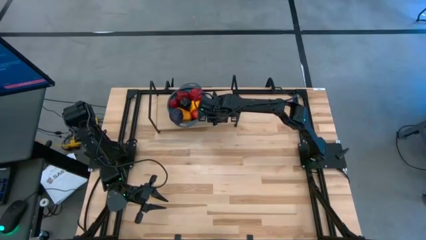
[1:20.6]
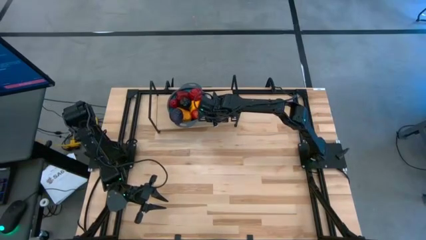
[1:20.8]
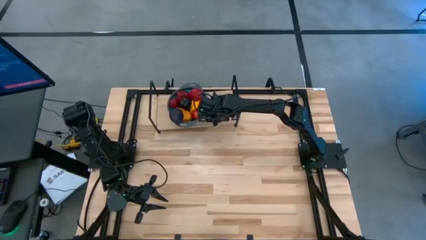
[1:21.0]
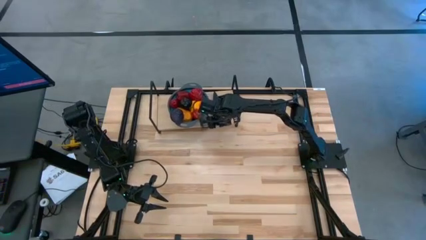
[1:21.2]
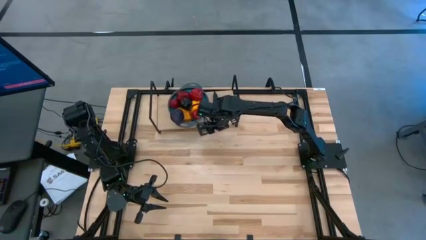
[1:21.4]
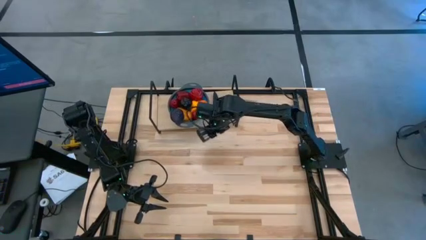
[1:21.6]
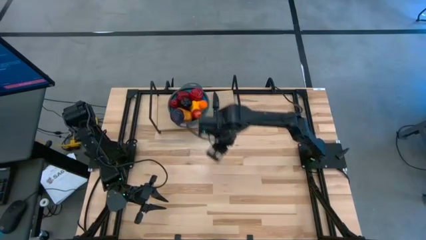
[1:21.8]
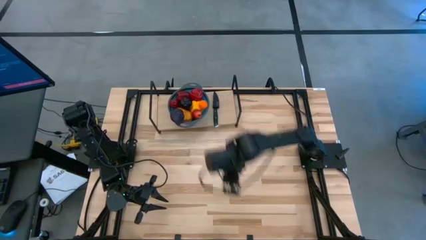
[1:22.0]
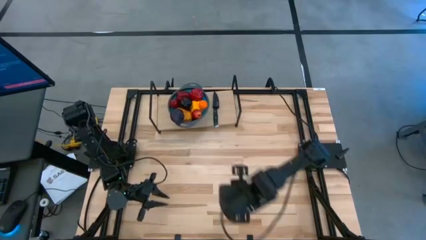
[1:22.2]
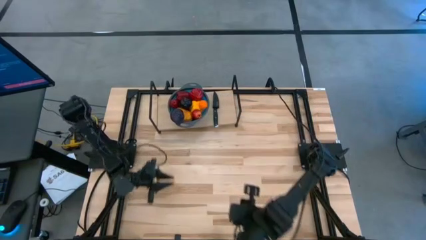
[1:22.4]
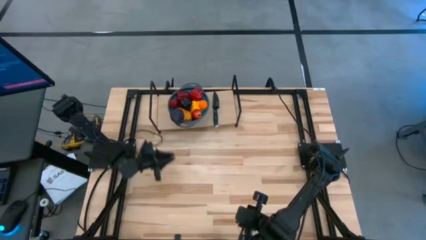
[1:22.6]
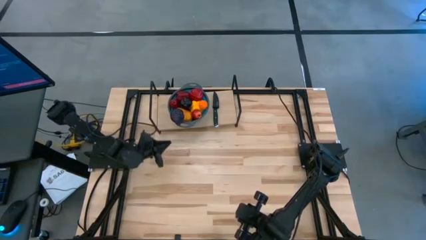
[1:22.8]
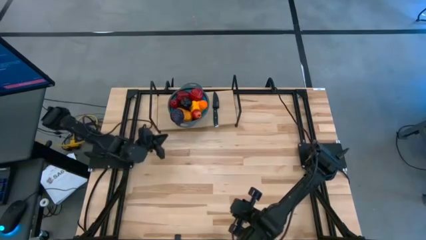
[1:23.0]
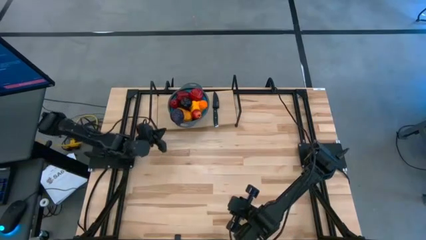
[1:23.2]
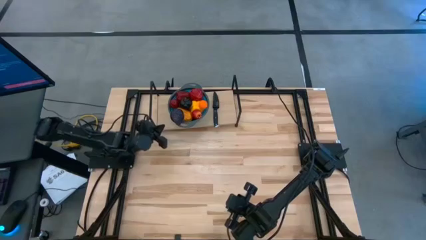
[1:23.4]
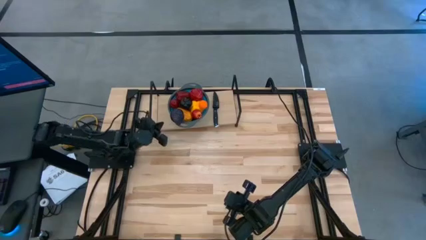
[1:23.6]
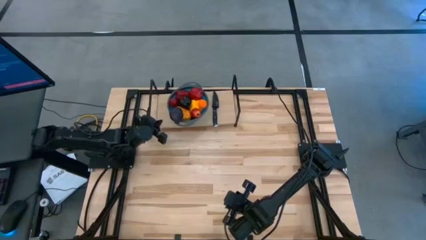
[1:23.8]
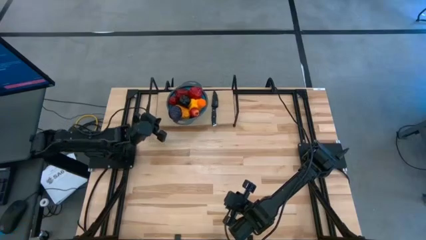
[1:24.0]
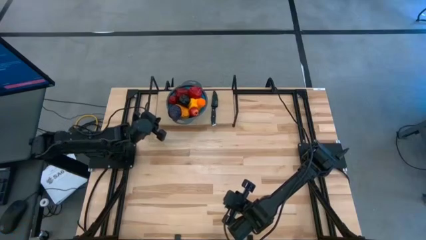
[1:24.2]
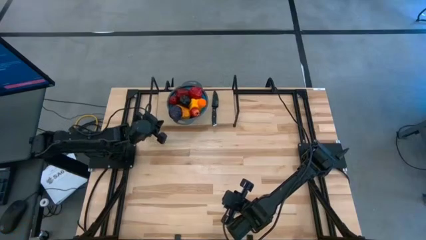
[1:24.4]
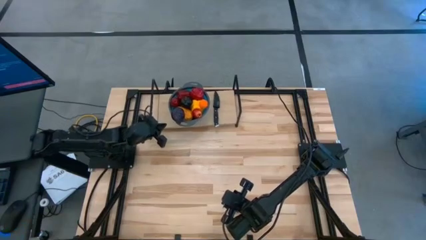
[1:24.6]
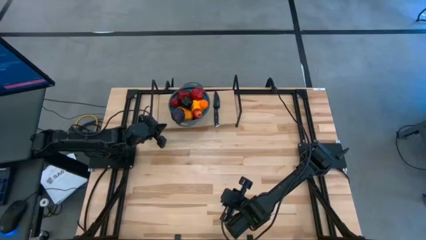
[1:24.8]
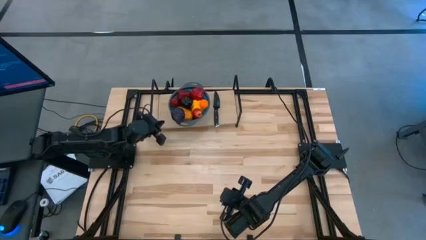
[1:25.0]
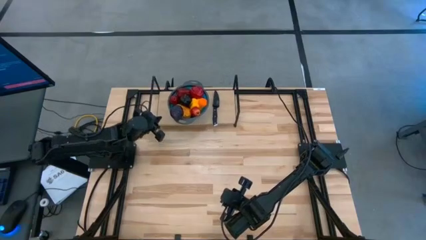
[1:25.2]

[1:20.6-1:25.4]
Task: Pick & Place Fruit
Adjust the shelf to align the position

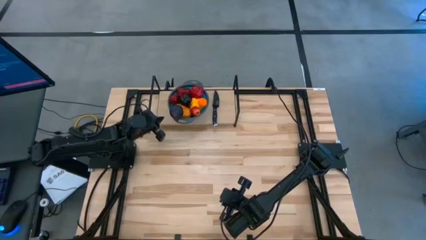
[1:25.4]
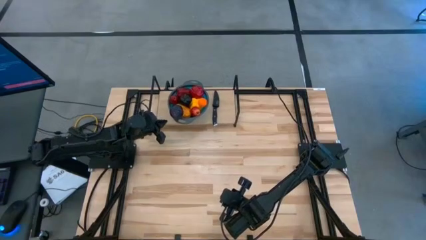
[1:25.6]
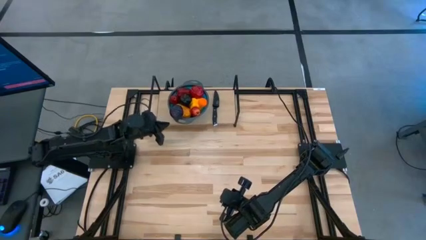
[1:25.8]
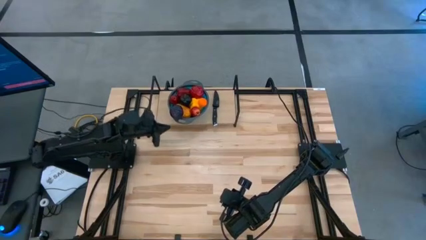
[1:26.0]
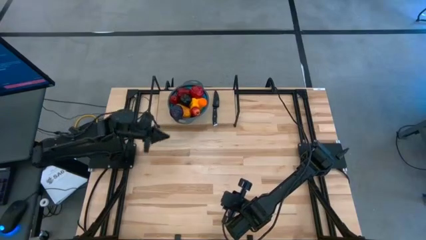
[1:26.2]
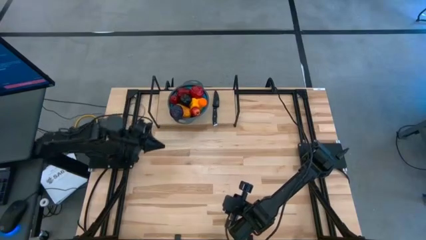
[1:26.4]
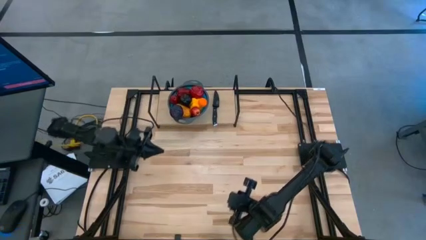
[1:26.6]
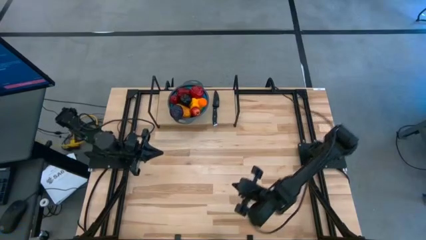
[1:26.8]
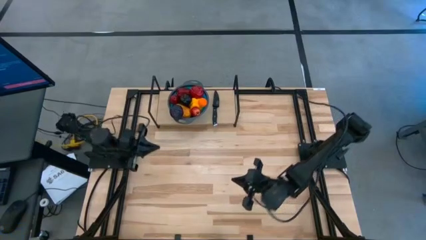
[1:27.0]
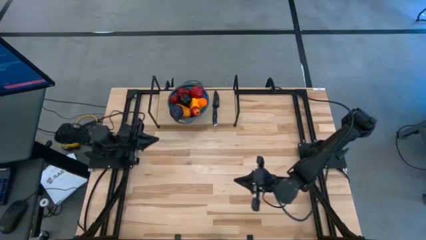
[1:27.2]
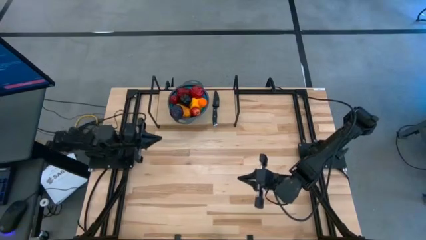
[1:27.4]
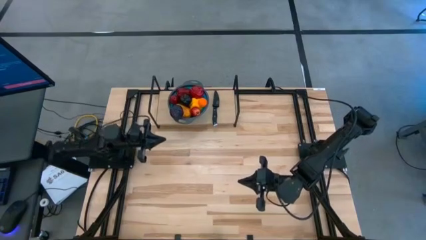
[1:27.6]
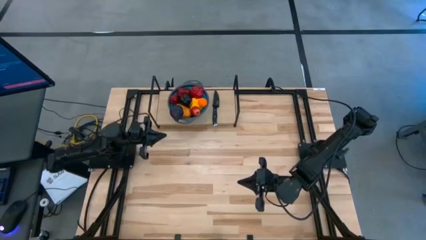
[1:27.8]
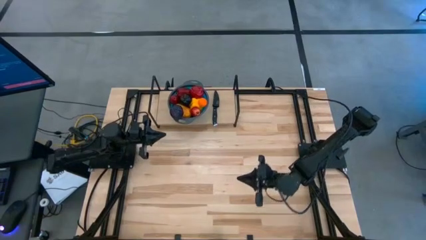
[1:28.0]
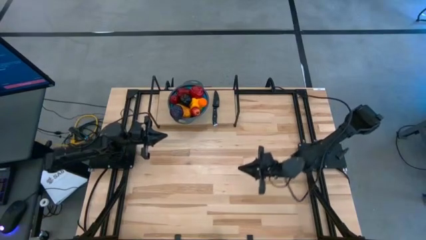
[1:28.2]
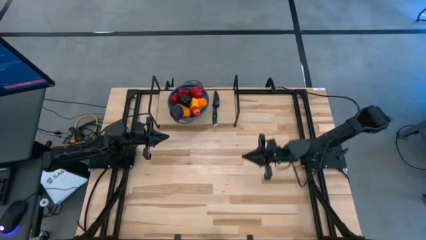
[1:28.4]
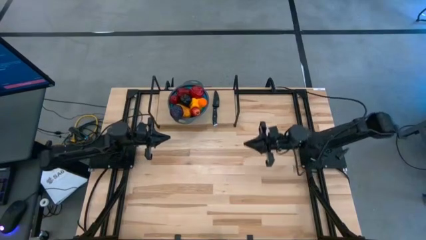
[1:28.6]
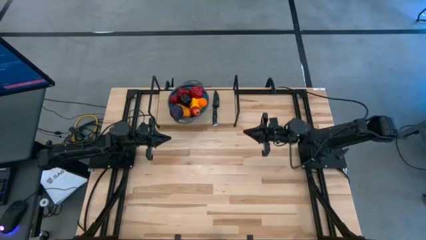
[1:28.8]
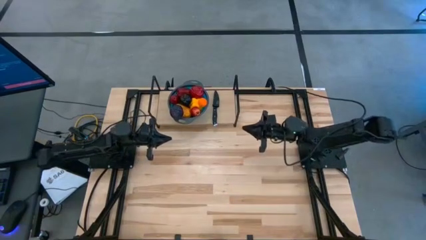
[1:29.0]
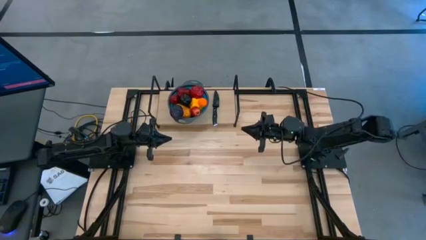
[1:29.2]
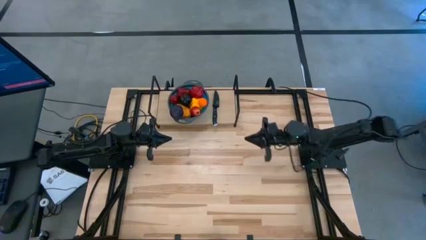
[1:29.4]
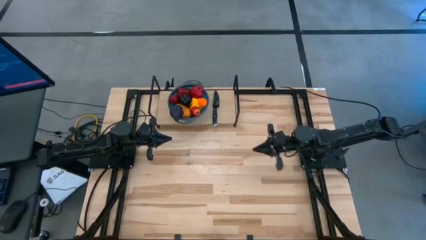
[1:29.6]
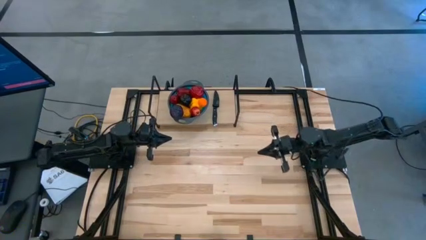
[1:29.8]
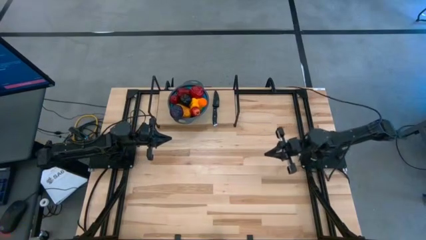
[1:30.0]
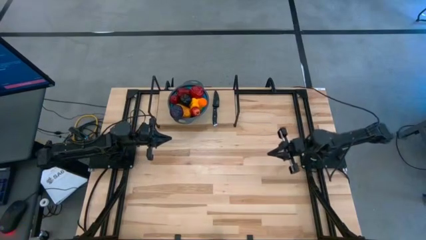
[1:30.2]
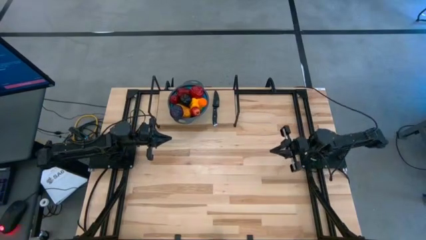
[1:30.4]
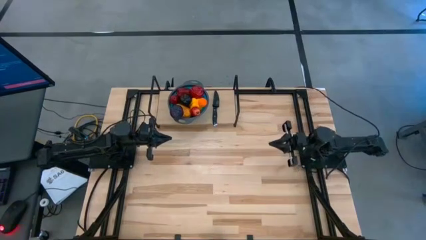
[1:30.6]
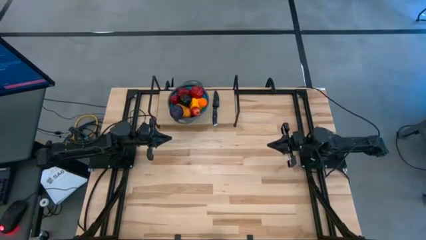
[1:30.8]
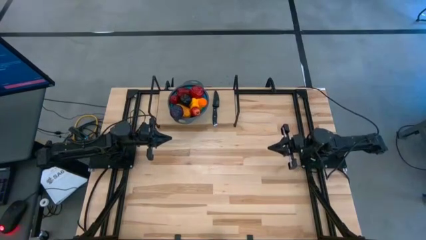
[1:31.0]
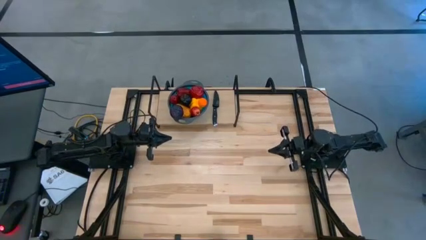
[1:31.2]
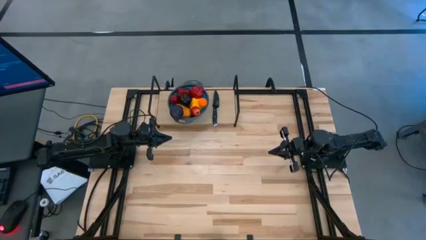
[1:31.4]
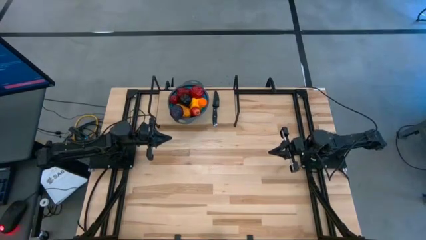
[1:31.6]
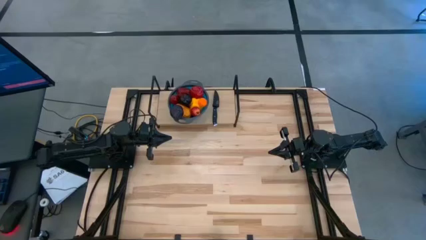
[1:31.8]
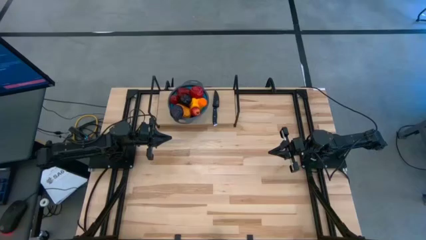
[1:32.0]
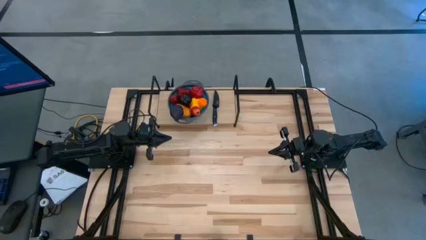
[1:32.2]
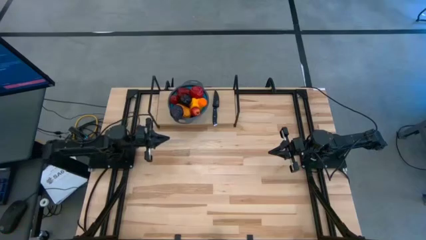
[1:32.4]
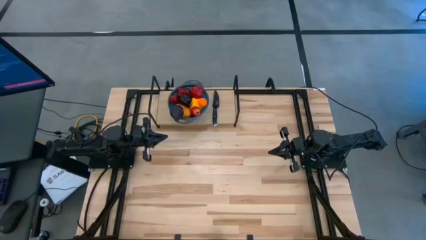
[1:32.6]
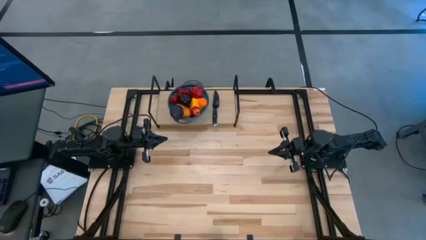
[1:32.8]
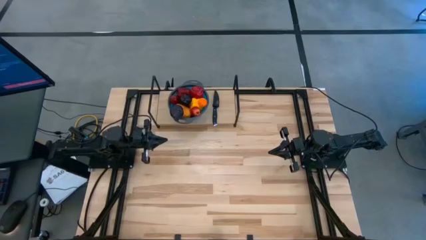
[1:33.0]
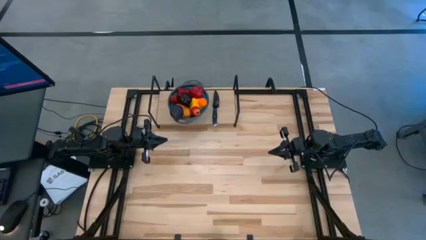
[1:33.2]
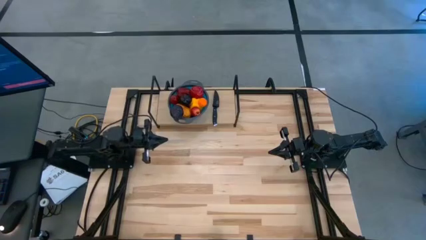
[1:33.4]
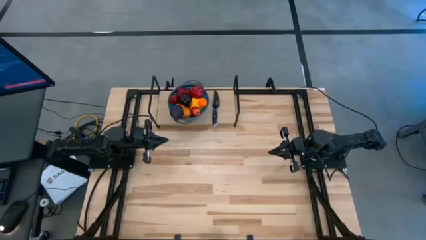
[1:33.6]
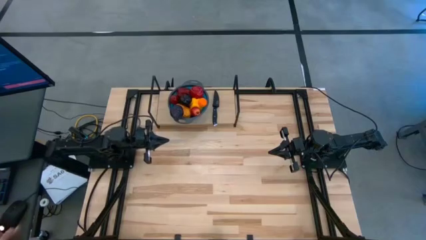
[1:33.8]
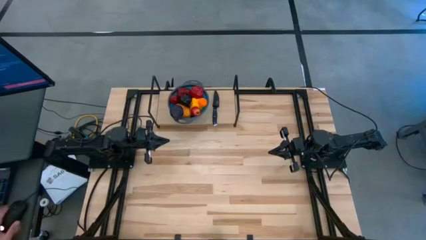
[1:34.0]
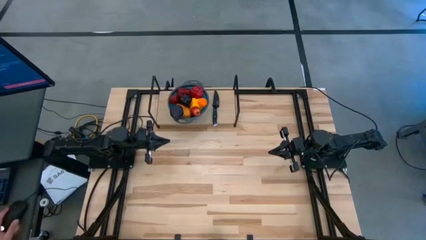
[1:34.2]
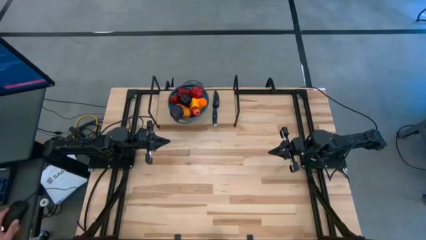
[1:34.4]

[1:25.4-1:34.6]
Return to Home Position

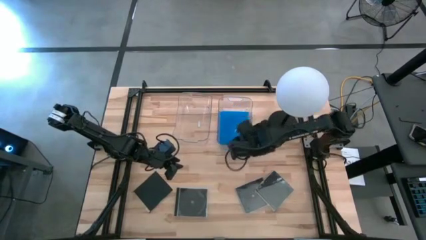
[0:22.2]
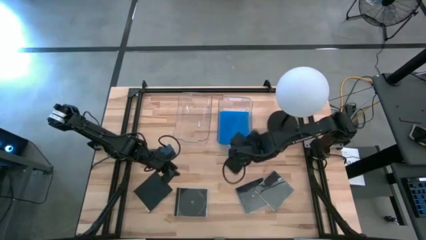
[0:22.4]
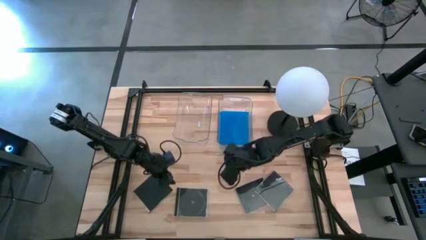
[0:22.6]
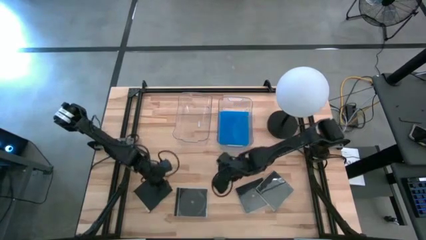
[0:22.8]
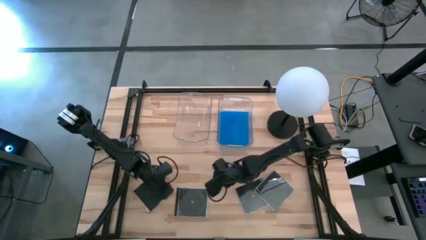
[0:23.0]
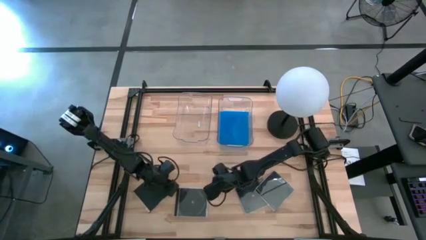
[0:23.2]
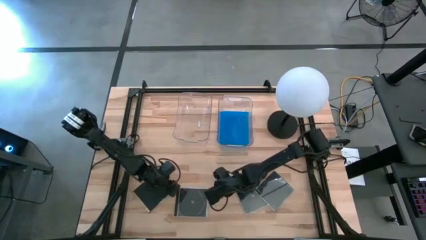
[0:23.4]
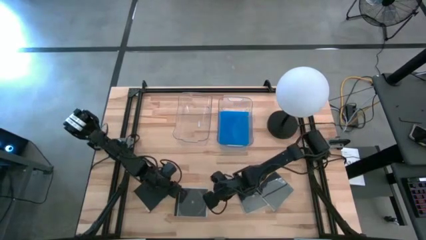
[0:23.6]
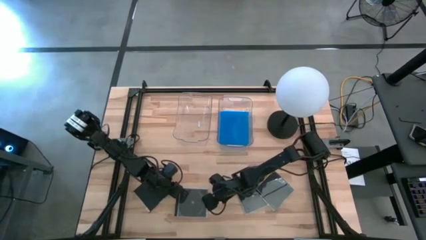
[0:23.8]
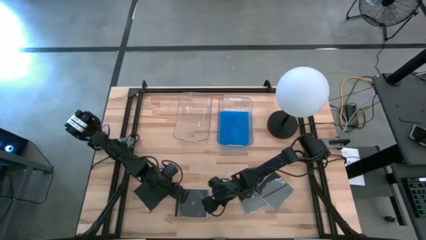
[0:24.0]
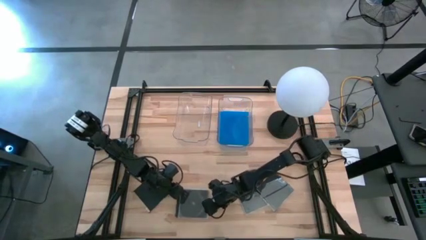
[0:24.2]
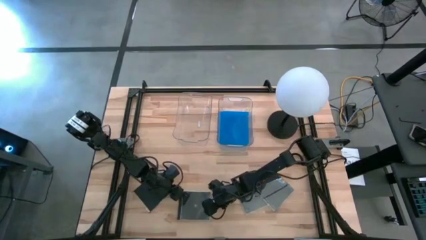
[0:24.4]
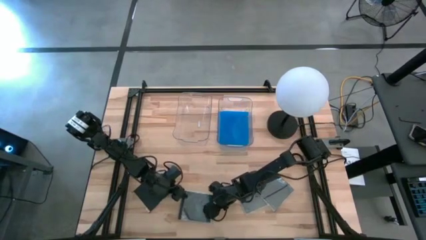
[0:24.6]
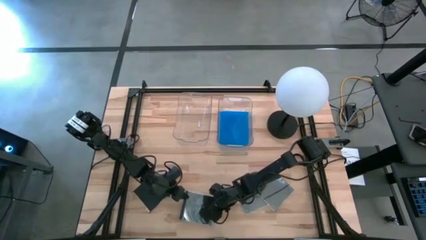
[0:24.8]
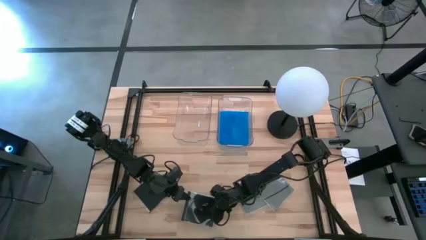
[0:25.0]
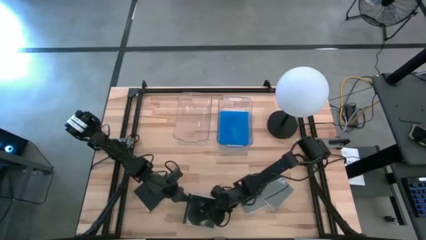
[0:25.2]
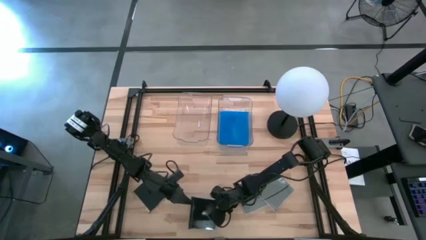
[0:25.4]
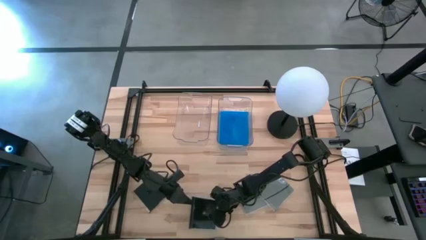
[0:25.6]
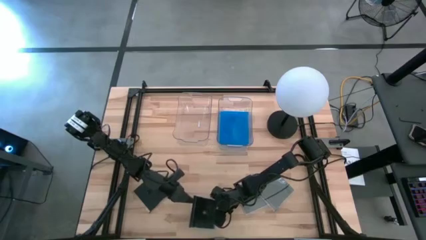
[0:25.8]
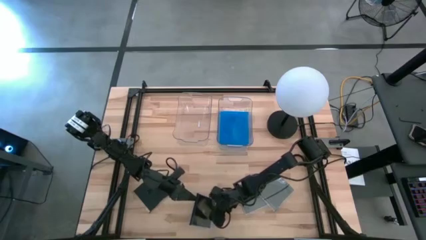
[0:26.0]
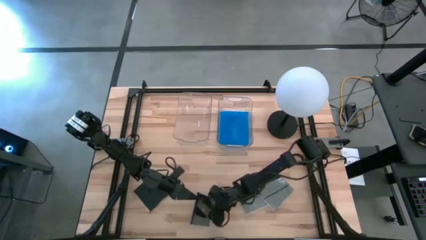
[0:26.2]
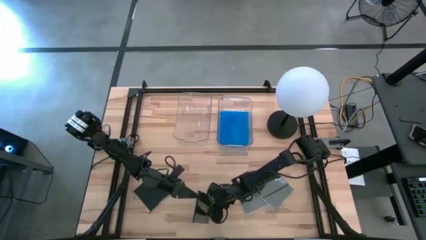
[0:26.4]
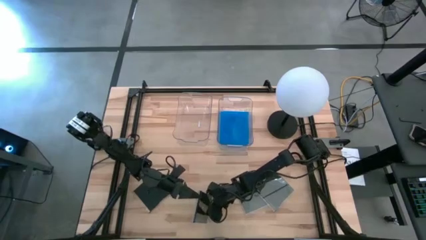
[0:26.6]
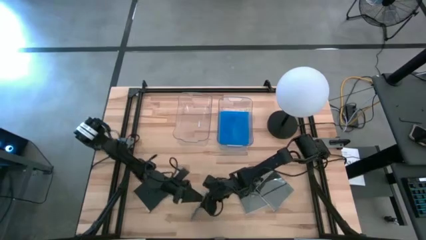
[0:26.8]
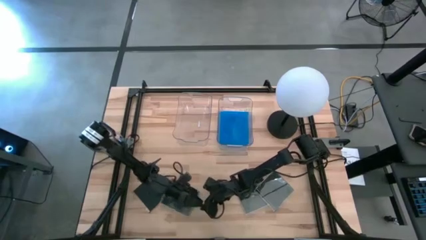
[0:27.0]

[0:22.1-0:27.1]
Task: Pick & place jewel cases by type
Put the black cd case into the left transparent bin
